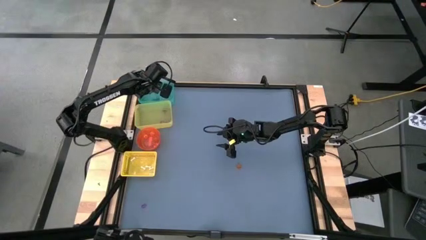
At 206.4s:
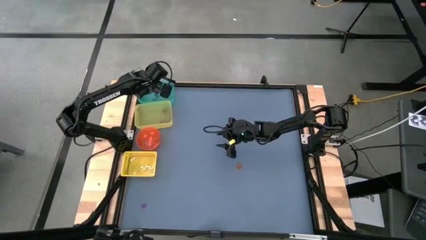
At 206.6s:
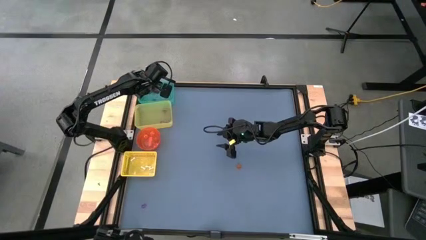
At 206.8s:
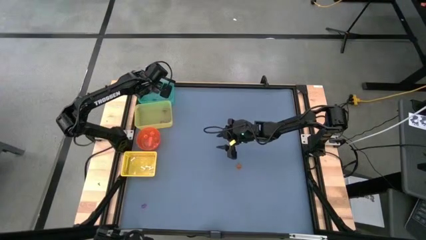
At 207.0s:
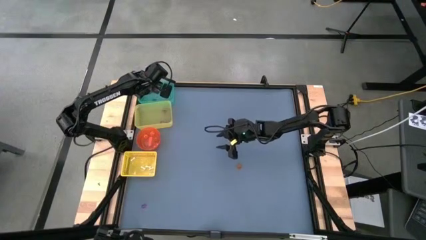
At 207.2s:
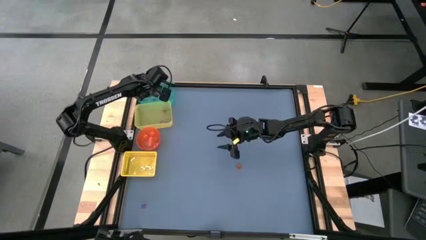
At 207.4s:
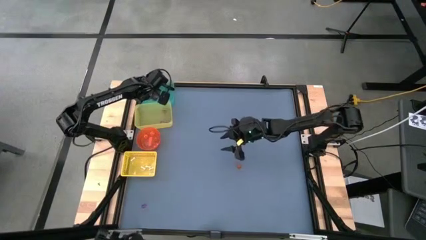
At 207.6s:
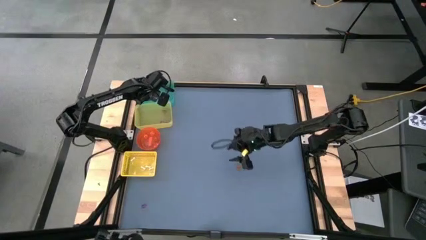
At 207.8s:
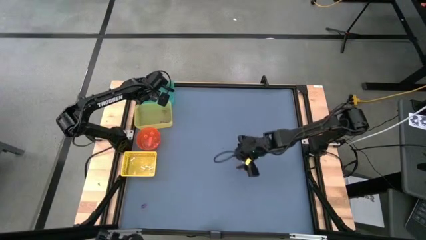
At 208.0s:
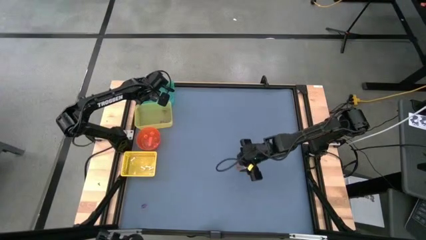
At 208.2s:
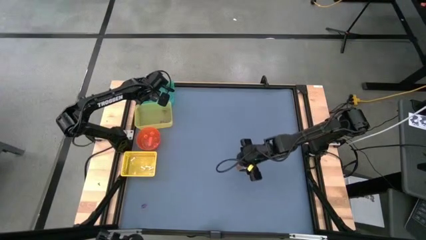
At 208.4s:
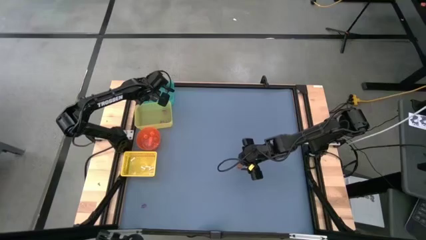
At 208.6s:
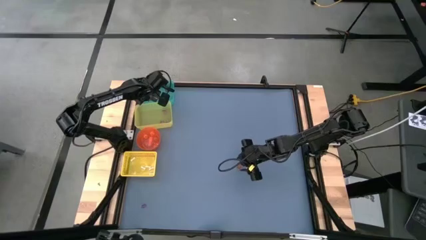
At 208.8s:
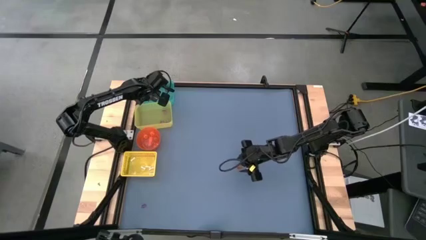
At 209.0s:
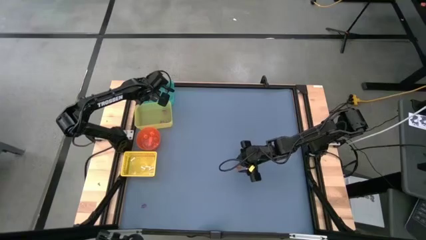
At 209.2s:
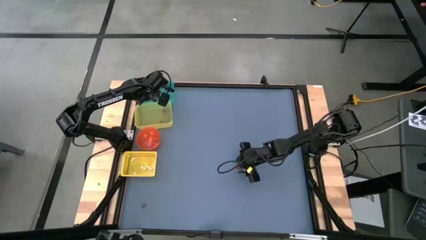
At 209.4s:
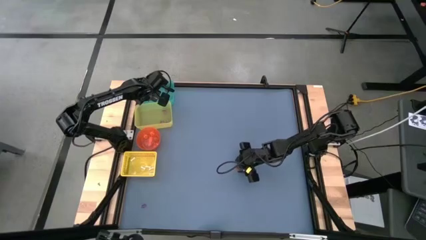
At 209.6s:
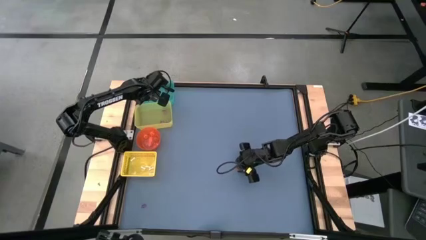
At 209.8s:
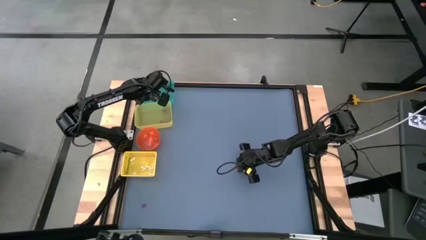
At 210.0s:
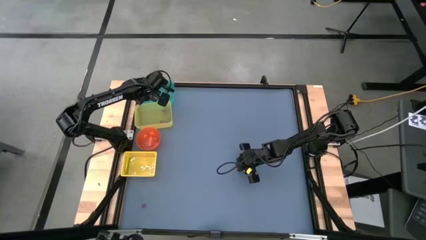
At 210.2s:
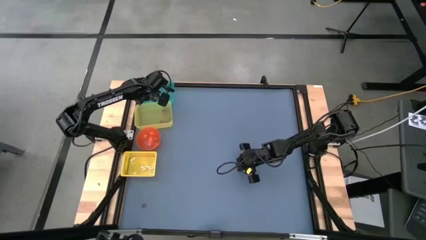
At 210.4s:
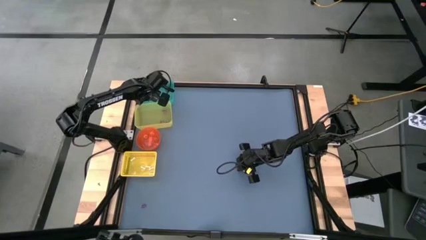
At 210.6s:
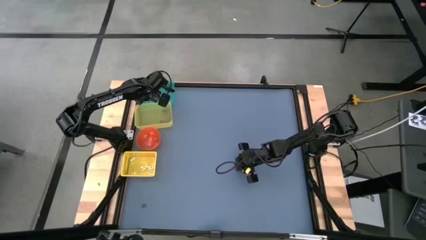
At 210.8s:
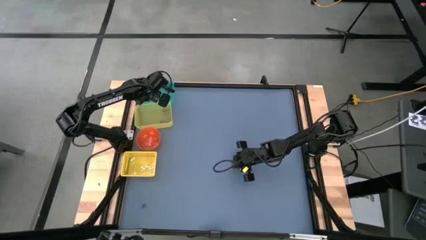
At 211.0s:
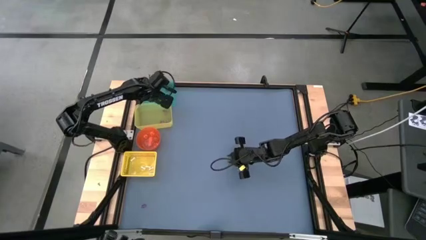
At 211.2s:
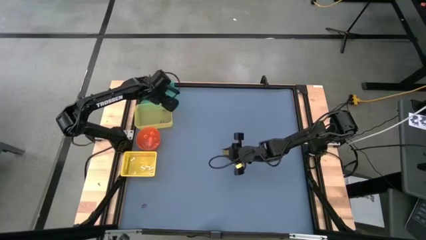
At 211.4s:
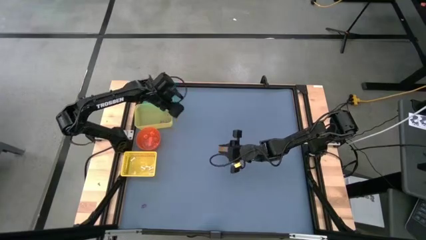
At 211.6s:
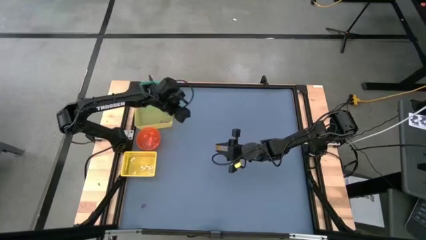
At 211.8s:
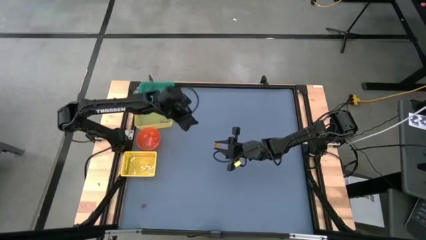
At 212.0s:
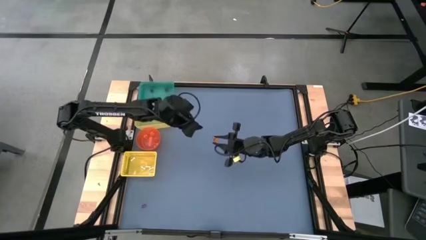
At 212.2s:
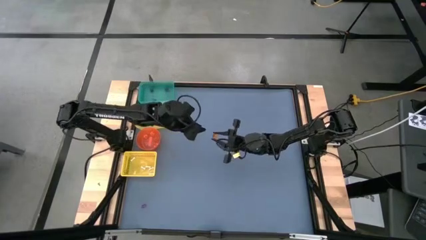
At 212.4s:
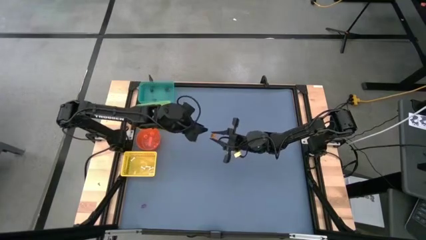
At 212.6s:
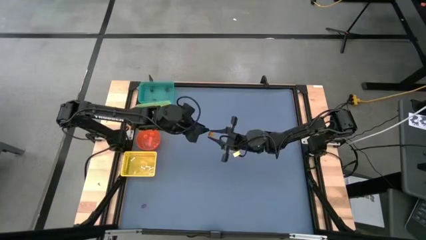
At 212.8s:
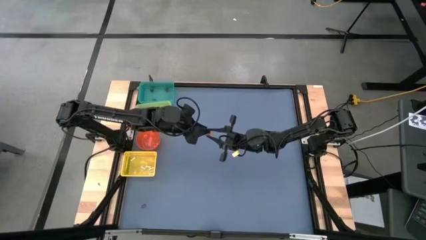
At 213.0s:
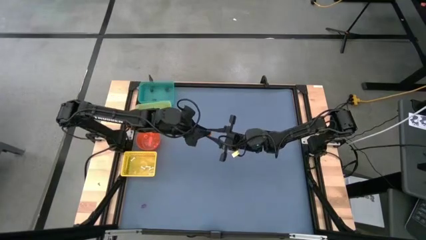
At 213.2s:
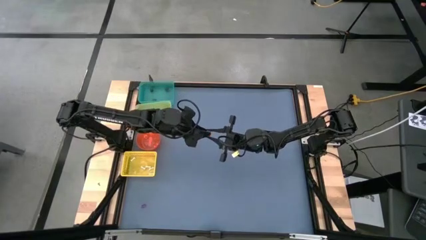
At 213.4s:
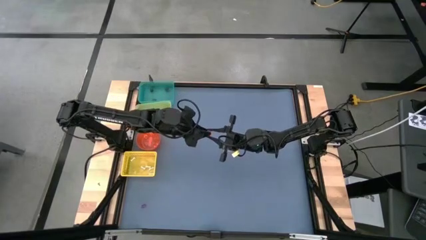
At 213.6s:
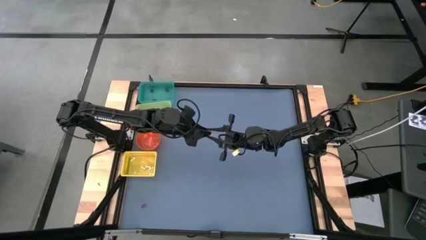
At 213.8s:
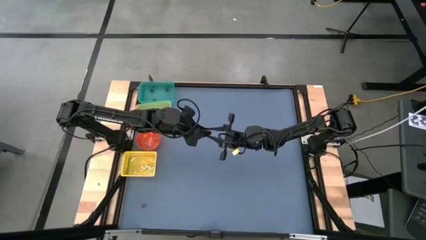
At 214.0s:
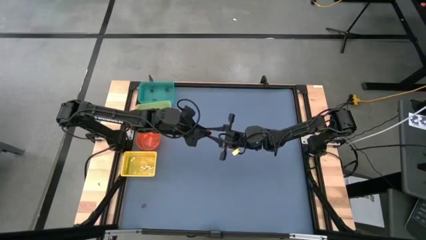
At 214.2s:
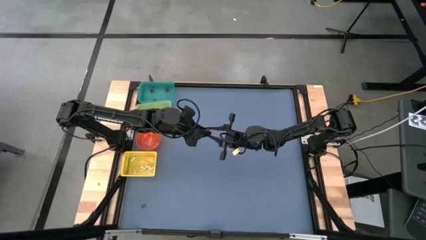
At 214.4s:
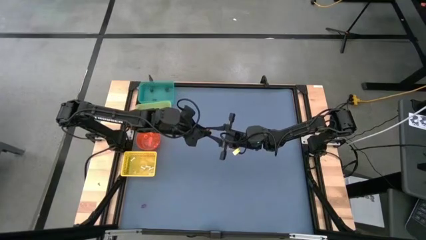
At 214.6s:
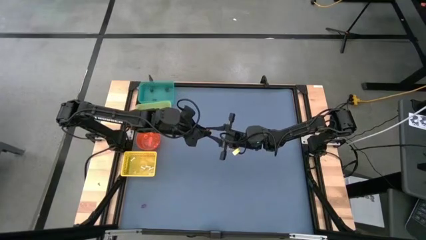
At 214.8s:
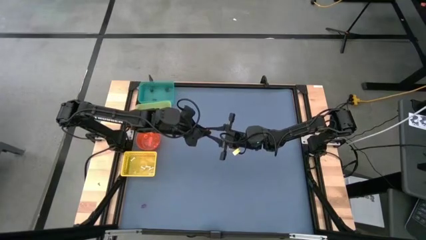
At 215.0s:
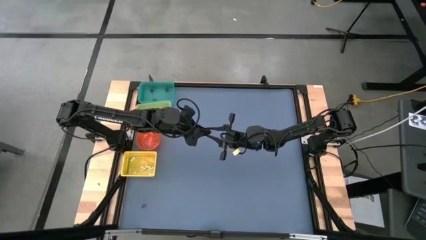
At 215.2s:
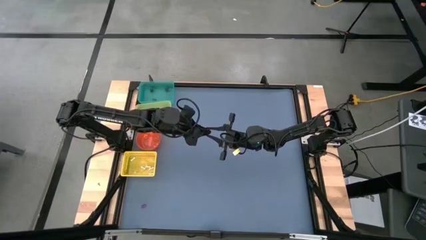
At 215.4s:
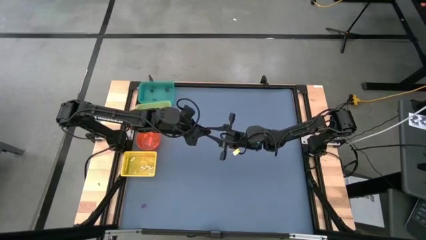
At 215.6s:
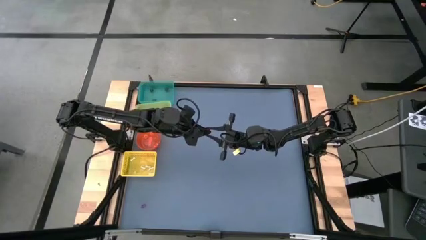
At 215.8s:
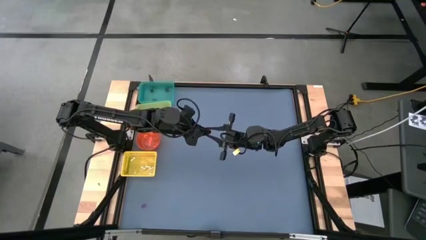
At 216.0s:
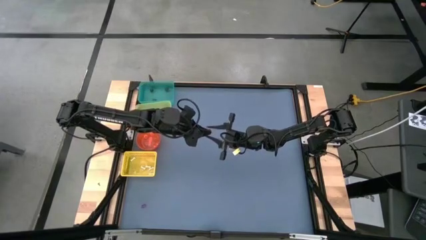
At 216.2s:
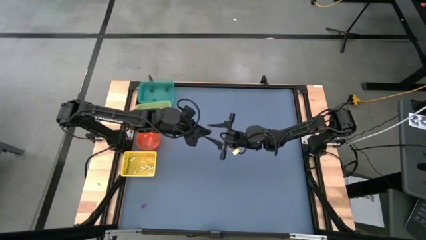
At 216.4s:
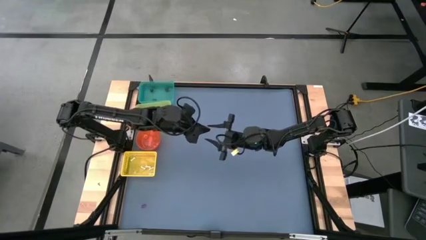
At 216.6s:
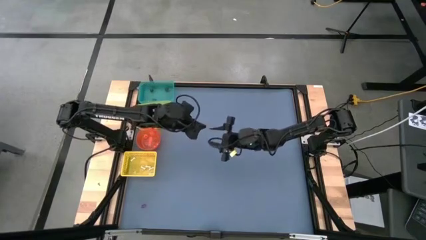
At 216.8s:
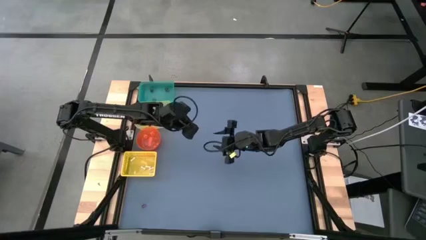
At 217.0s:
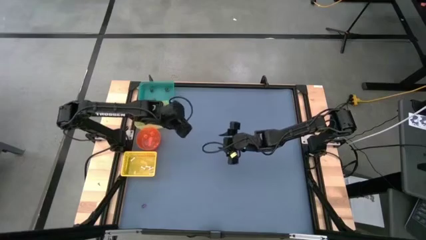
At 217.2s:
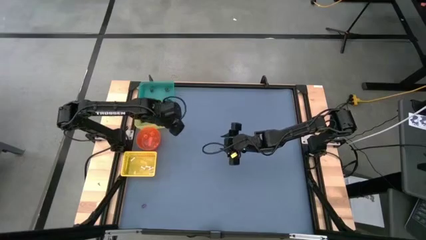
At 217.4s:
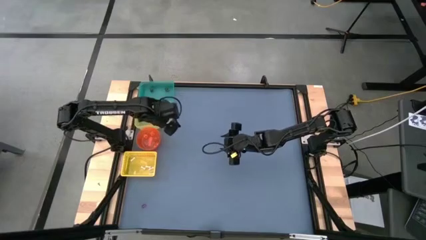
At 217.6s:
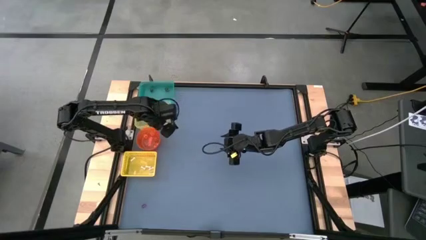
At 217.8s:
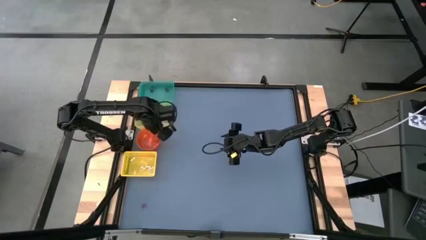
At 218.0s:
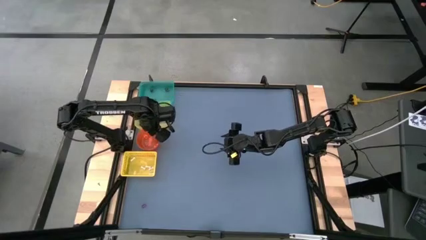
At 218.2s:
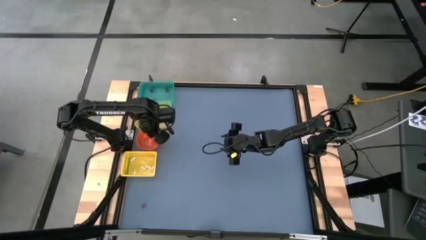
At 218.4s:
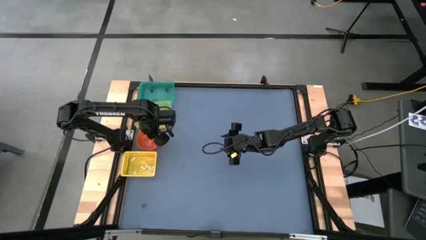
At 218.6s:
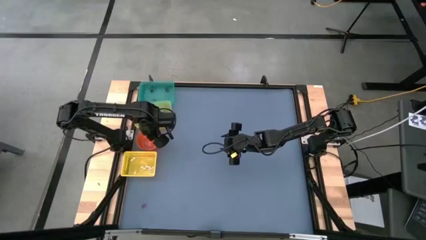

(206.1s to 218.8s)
Task: Sort Halloween decoration
Put the orange pumpkin toy into the orange bin

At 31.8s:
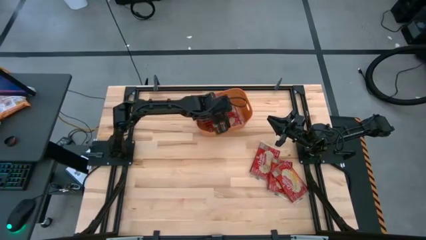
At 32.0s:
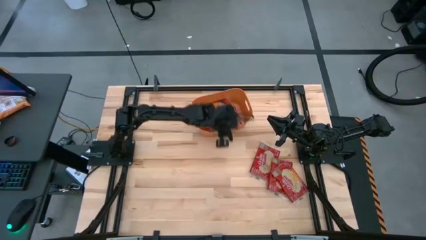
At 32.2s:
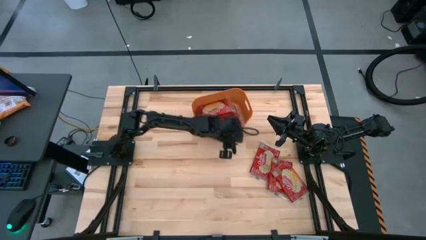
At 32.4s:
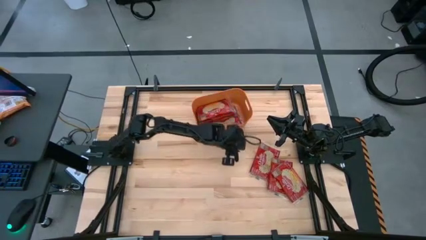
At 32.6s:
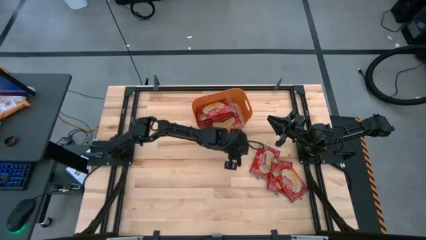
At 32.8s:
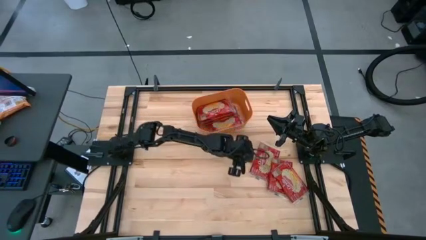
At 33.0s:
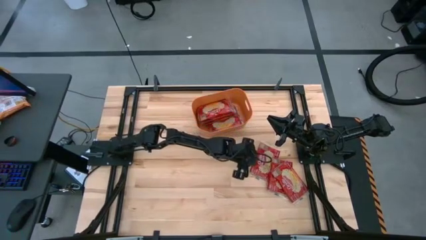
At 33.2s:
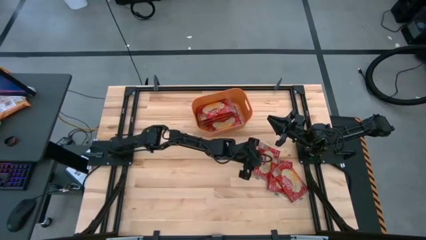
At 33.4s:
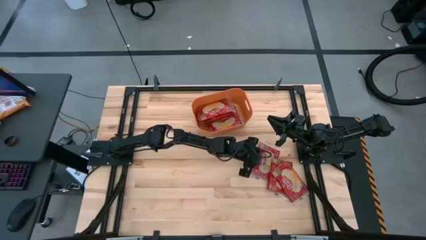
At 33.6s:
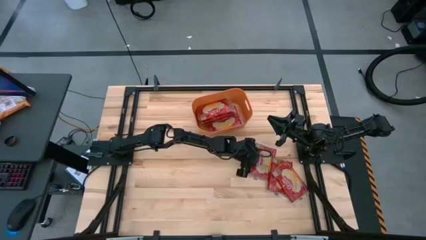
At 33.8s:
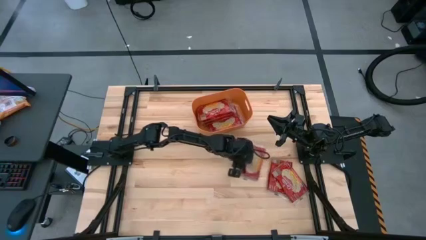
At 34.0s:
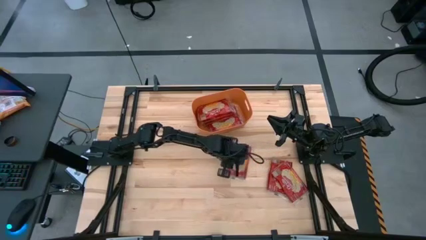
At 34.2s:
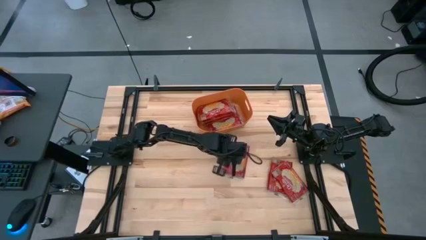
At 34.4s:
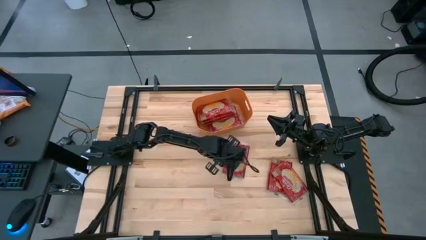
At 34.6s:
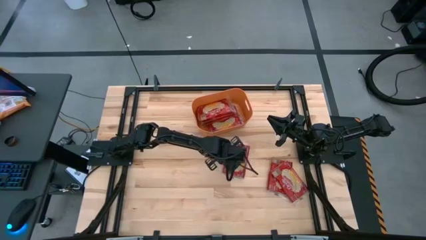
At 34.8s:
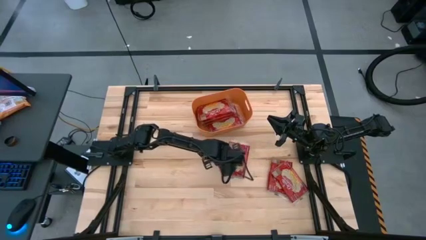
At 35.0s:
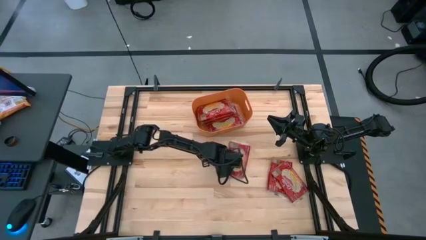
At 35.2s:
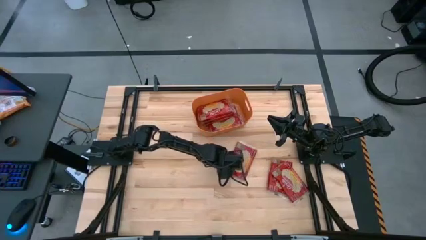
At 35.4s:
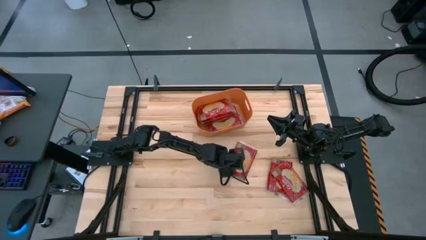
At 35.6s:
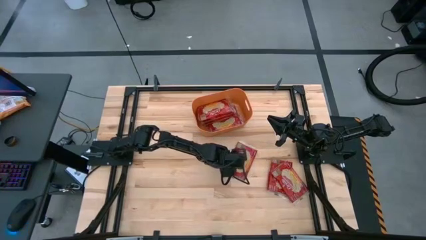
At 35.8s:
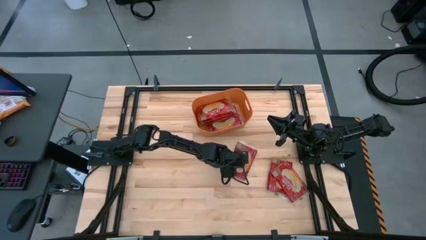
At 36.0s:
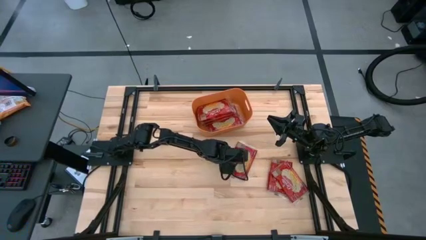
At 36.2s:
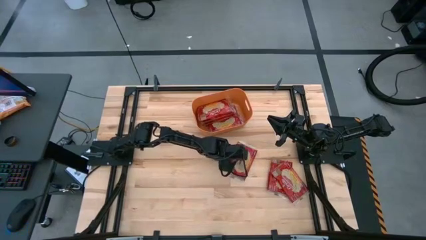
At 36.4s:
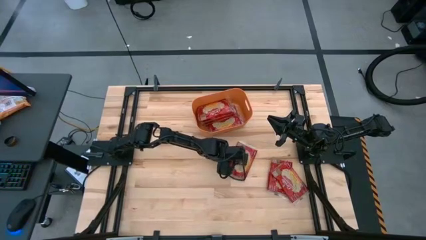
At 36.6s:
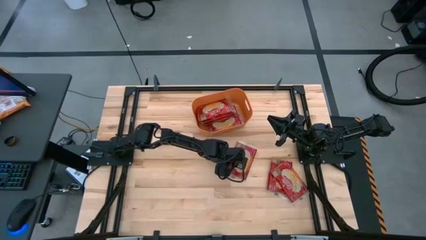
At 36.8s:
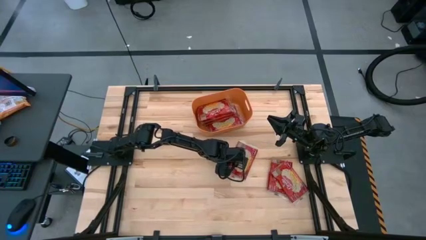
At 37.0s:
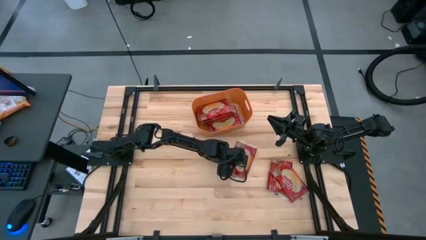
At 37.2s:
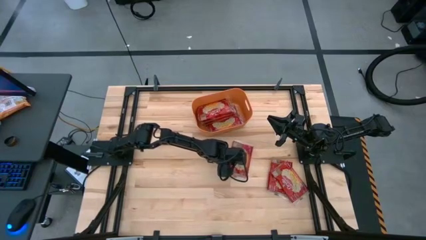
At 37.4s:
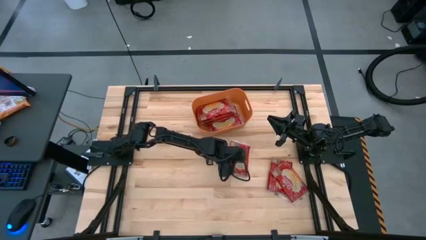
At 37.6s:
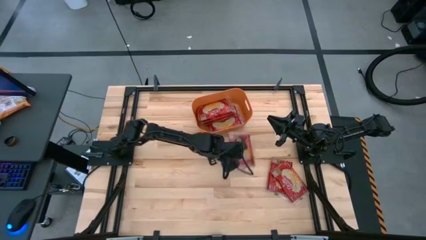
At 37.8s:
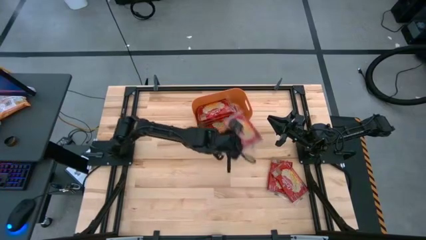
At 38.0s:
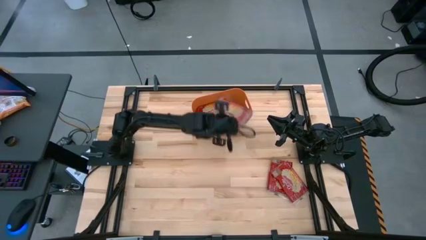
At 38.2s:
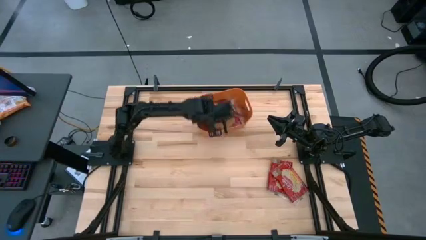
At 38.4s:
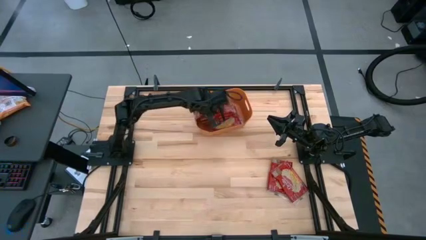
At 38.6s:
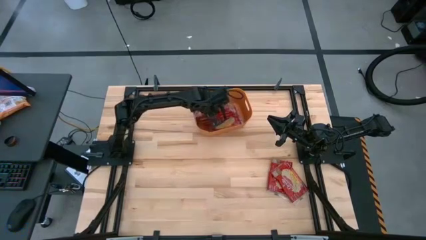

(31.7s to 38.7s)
Task: Sort popcorn bags into baskets
Put the red popcorn bag into the orange bin
